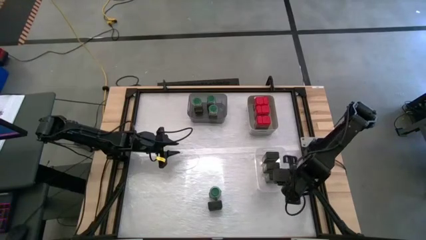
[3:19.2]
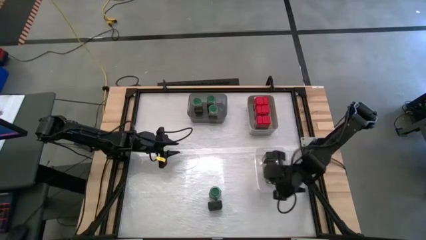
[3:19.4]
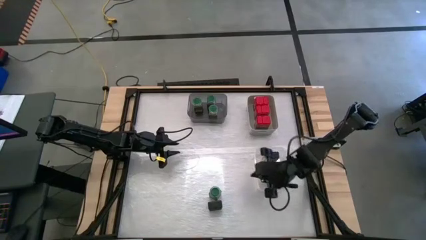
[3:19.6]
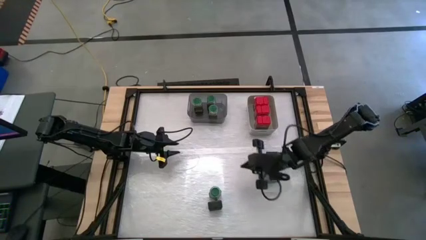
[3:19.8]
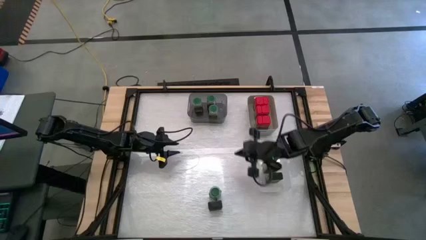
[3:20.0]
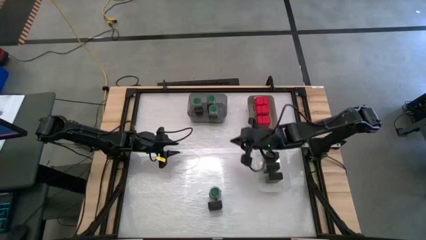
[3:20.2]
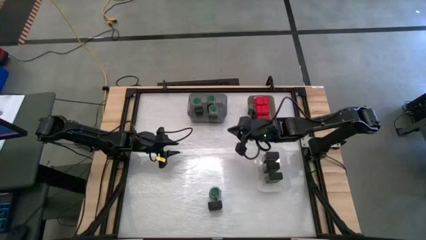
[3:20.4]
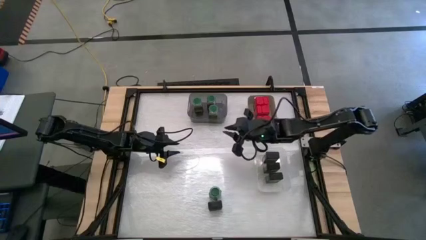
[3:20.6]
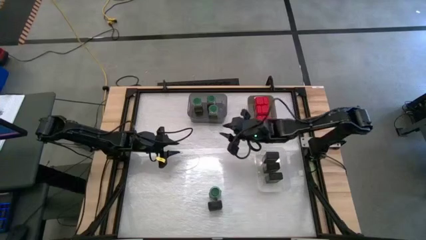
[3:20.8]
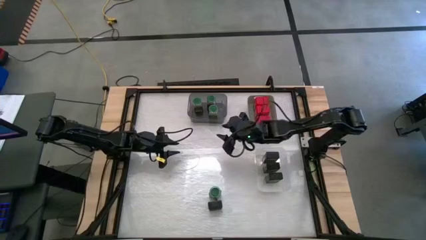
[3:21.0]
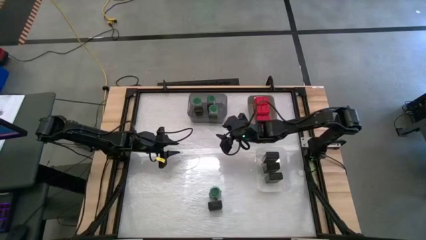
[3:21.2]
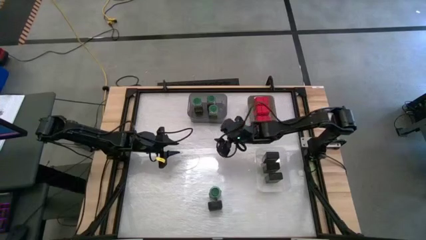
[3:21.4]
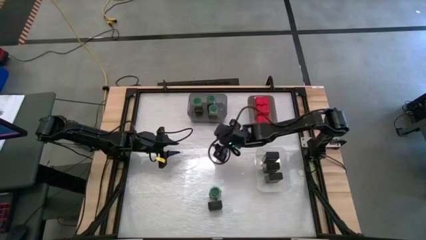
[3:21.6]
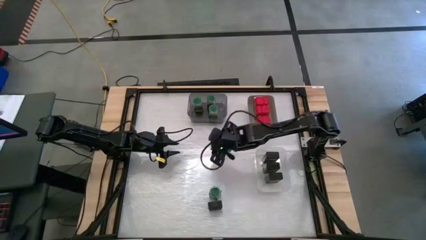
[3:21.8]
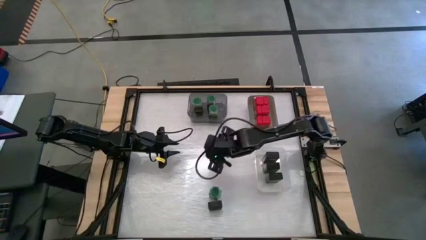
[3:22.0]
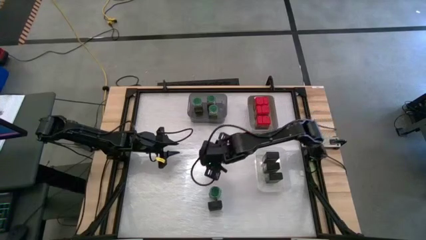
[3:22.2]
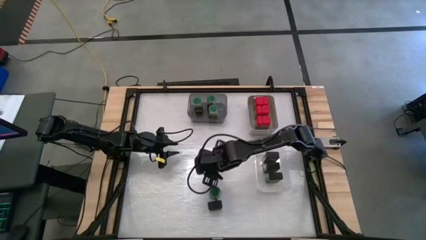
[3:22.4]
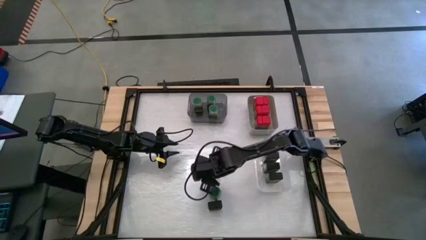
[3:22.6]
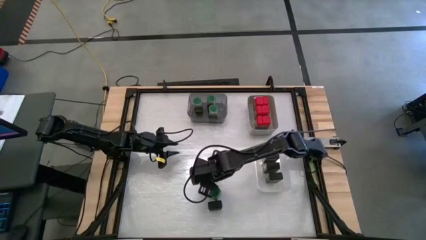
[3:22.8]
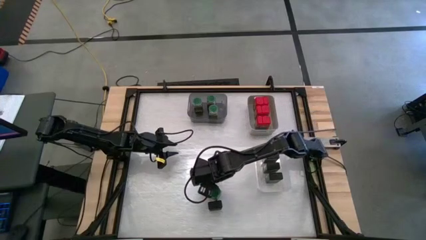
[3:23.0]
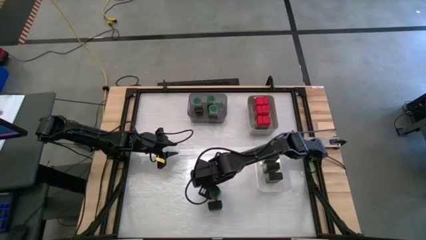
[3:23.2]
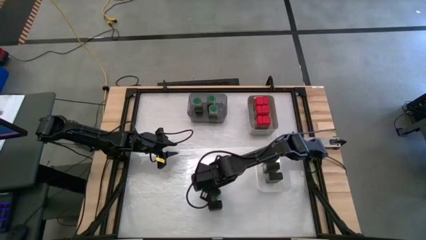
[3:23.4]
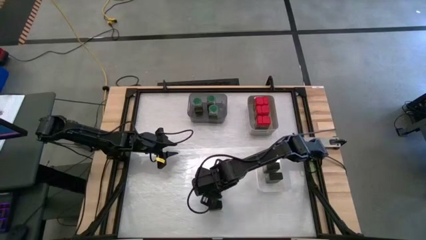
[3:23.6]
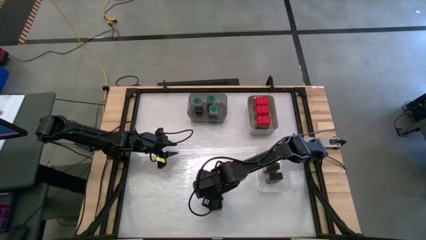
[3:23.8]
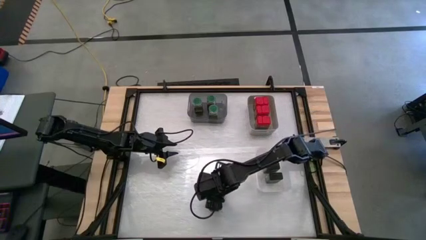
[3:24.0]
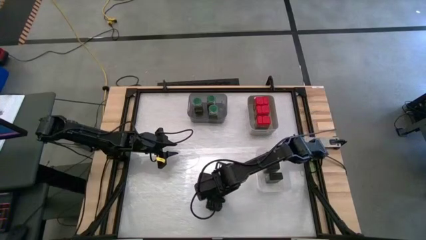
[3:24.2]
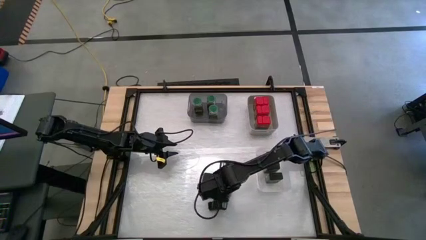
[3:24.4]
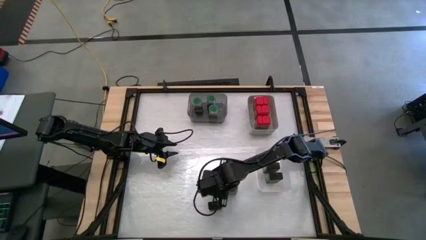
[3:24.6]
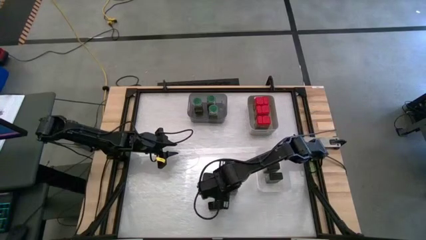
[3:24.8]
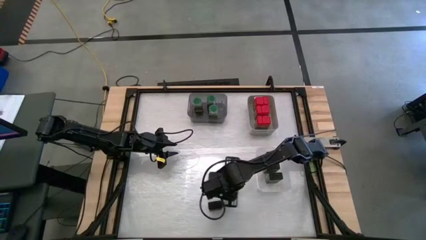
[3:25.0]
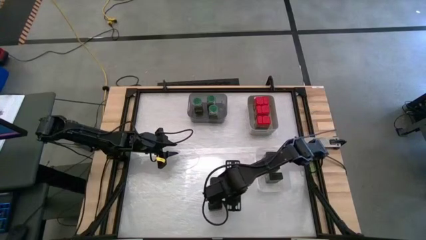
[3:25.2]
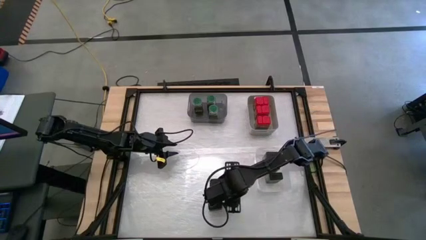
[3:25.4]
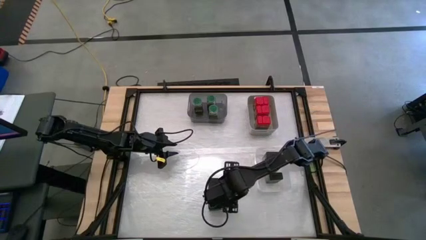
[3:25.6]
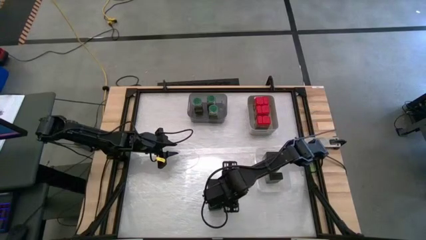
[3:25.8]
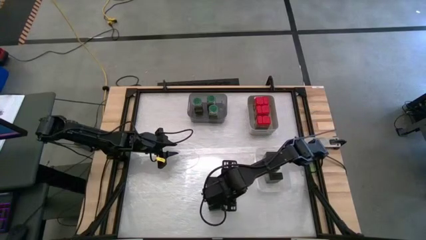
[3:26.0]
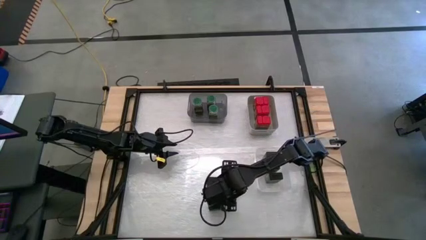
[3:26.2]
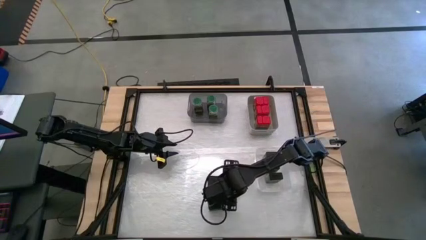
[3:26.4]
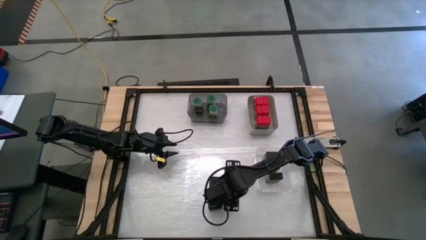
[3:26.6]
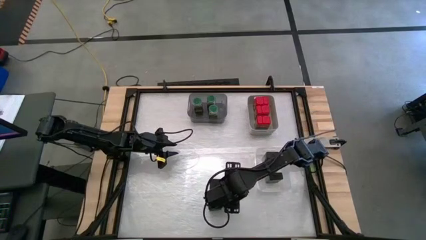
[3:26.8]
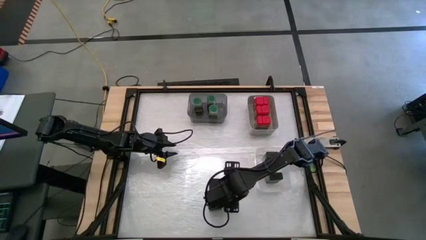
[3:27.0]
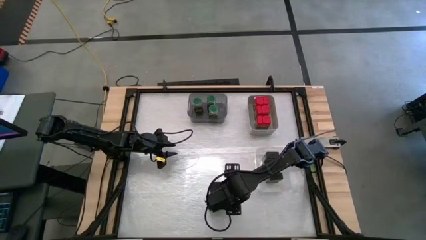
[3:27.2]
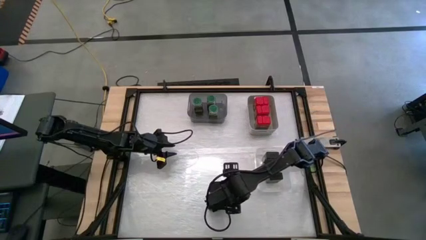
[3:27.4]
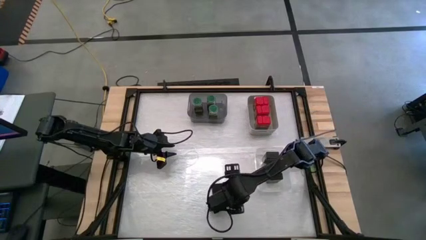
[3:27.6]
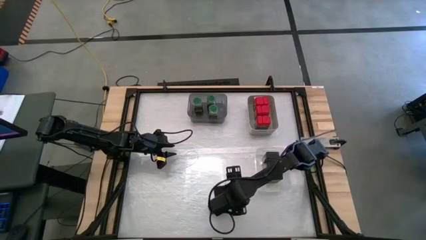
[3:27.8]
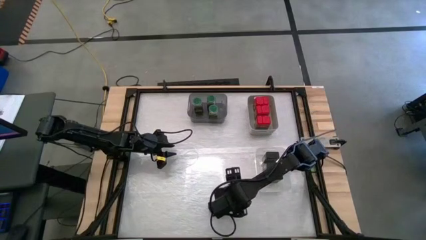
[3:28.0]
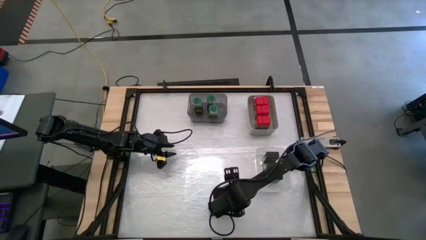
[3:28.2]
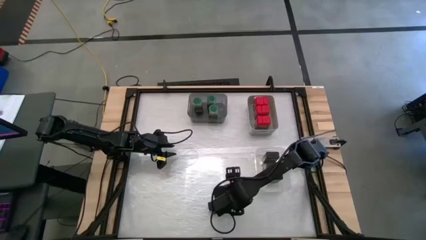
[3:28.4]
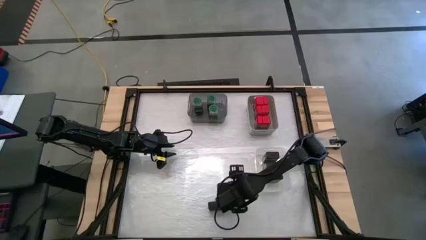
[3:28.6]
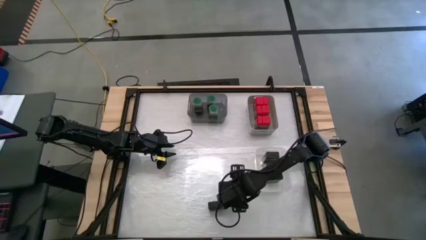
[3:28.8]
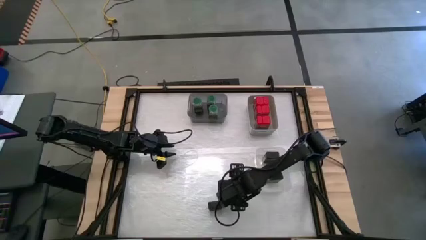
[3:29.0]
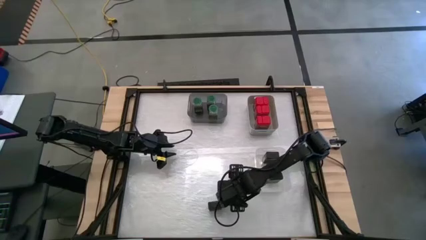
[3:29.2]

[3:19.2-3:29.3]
Task: Sort spices by type
Put the green seasoning bottle into the black bin
